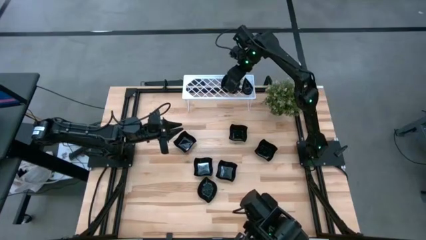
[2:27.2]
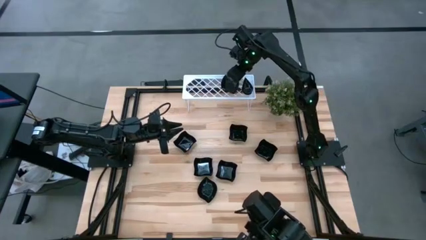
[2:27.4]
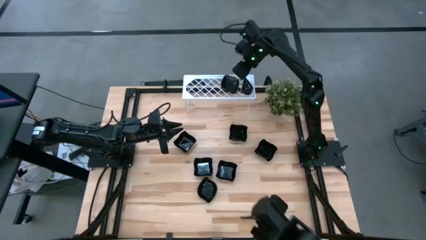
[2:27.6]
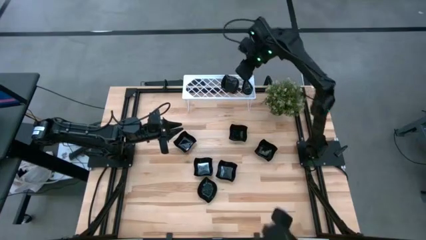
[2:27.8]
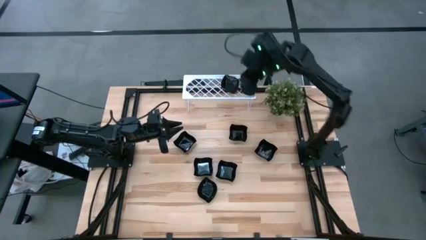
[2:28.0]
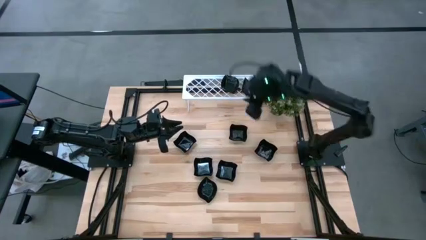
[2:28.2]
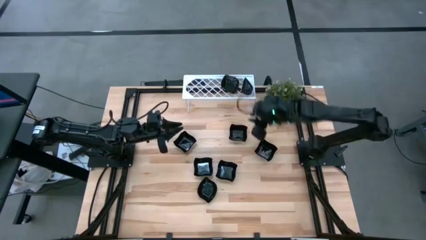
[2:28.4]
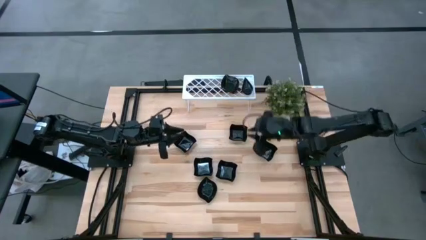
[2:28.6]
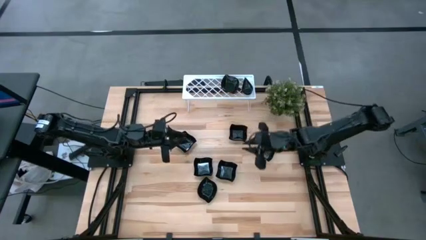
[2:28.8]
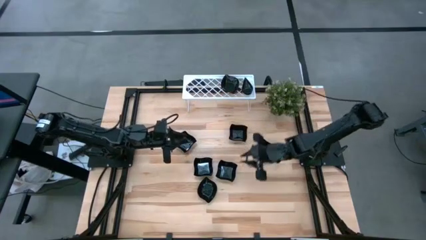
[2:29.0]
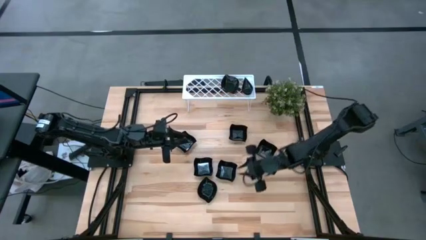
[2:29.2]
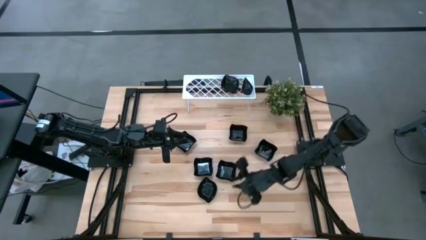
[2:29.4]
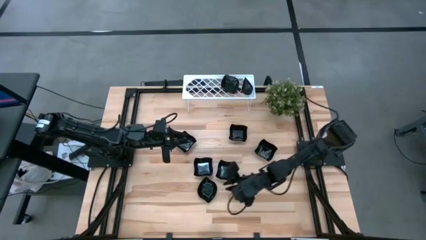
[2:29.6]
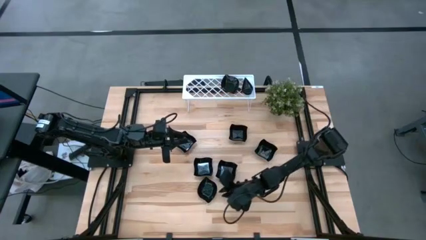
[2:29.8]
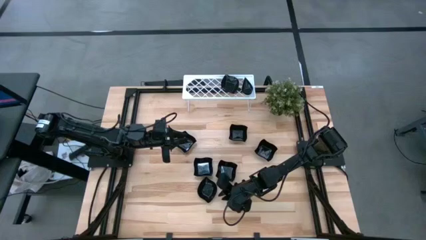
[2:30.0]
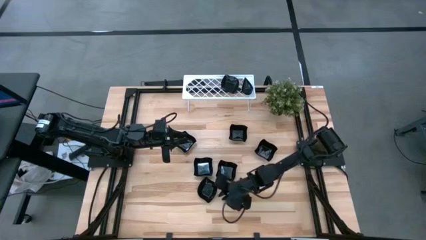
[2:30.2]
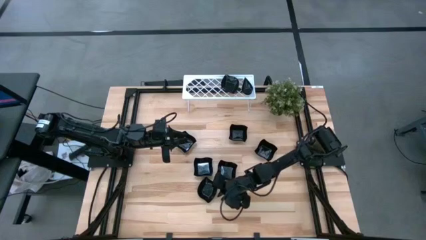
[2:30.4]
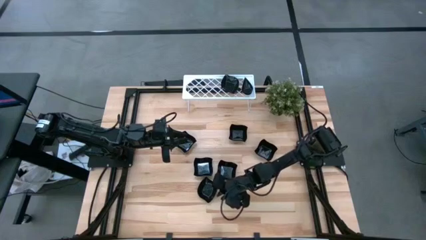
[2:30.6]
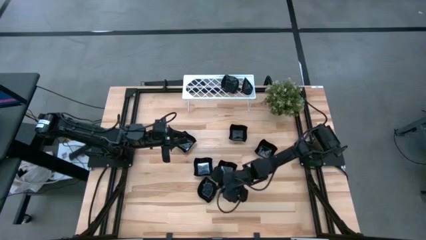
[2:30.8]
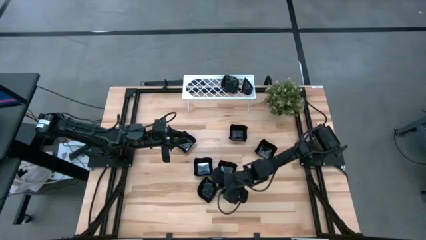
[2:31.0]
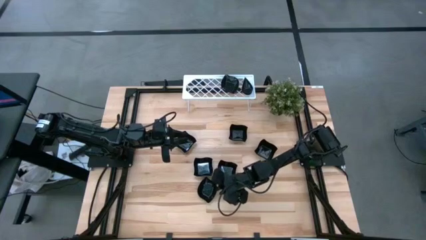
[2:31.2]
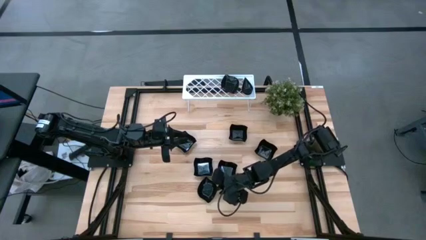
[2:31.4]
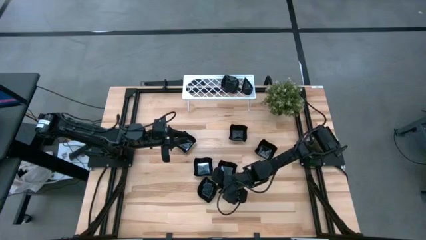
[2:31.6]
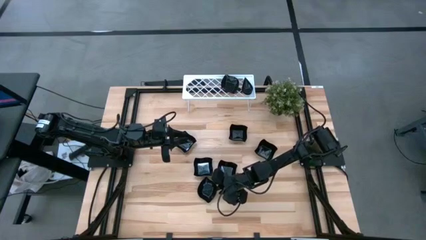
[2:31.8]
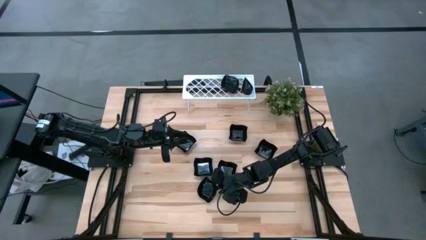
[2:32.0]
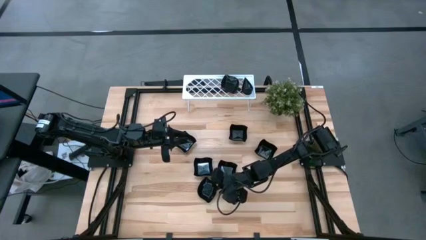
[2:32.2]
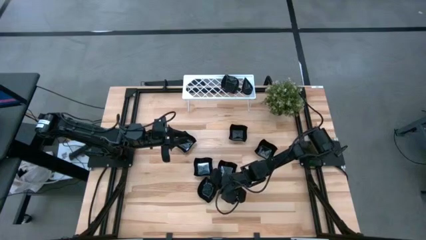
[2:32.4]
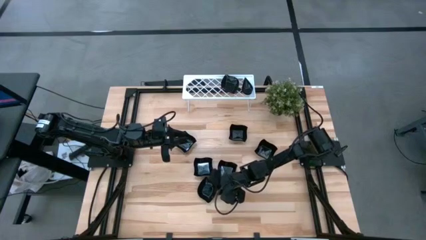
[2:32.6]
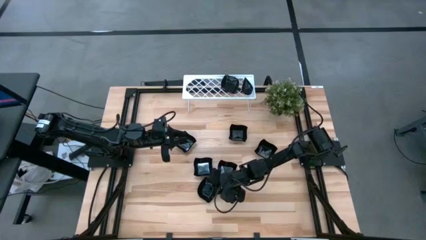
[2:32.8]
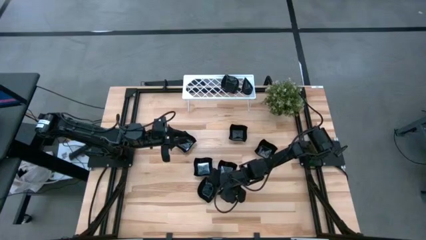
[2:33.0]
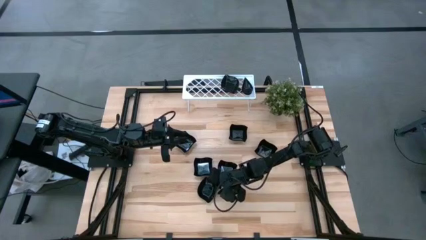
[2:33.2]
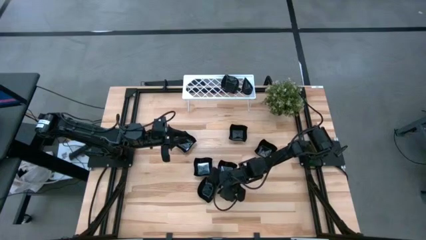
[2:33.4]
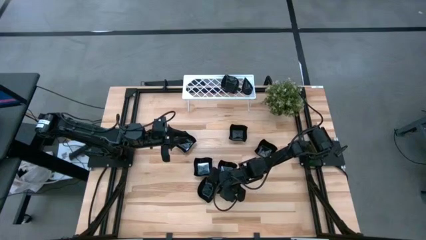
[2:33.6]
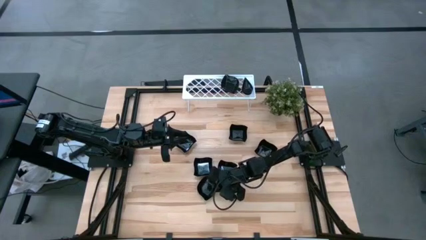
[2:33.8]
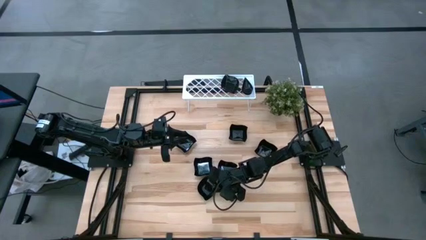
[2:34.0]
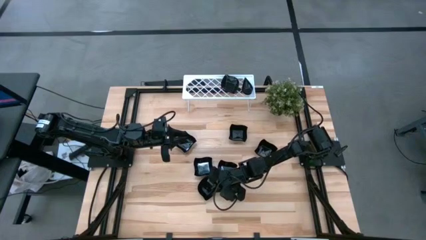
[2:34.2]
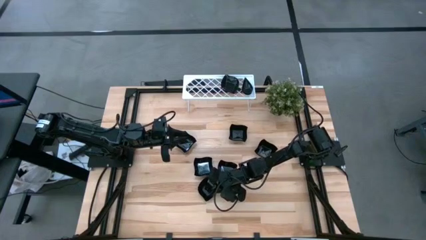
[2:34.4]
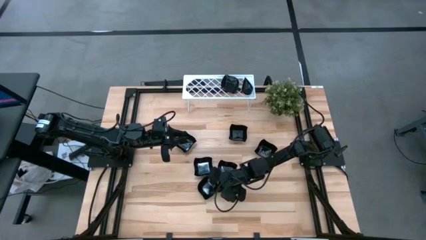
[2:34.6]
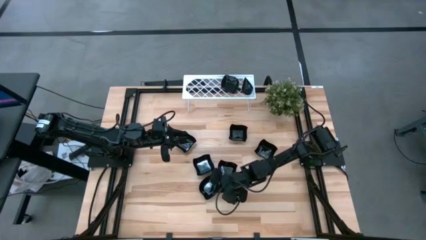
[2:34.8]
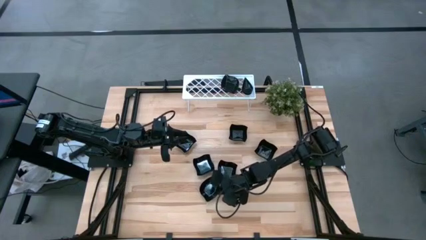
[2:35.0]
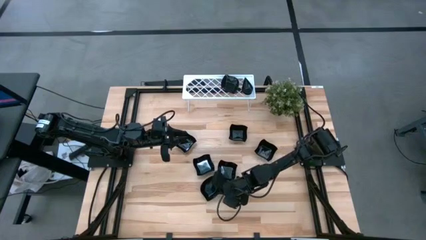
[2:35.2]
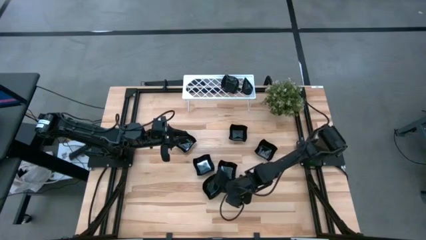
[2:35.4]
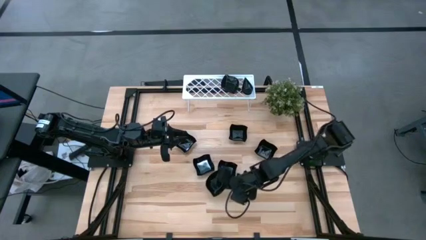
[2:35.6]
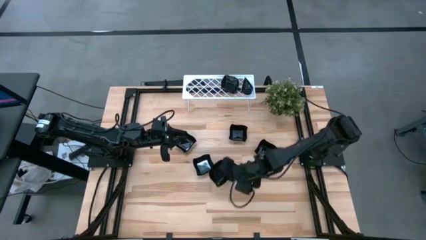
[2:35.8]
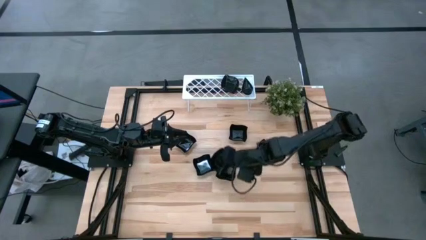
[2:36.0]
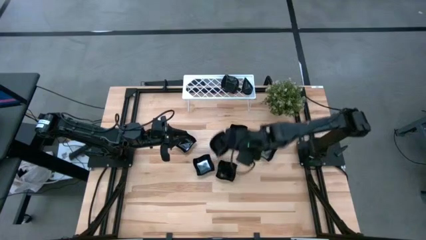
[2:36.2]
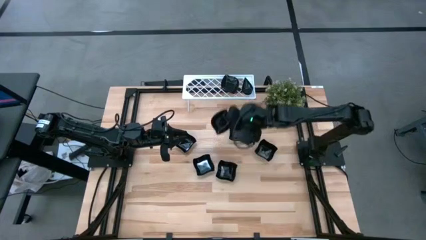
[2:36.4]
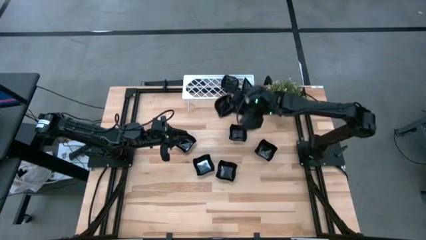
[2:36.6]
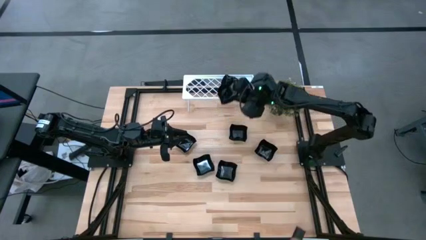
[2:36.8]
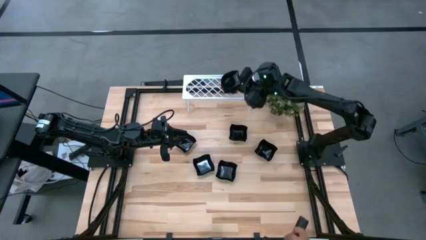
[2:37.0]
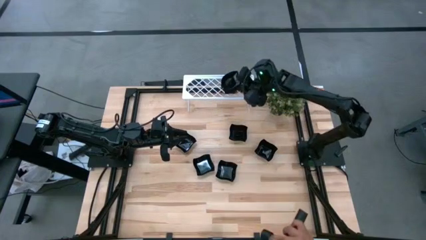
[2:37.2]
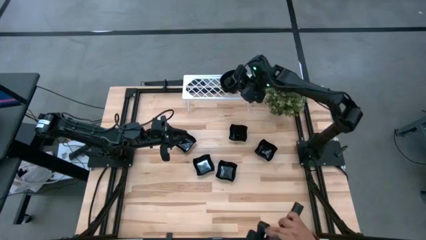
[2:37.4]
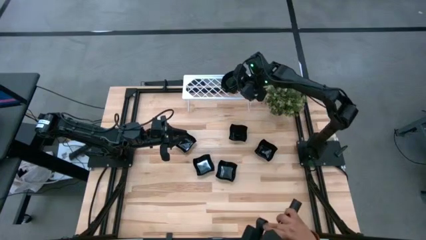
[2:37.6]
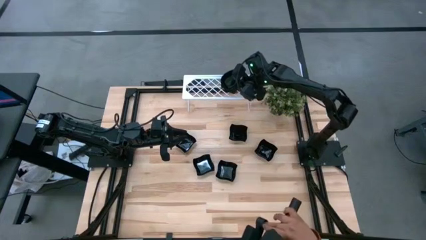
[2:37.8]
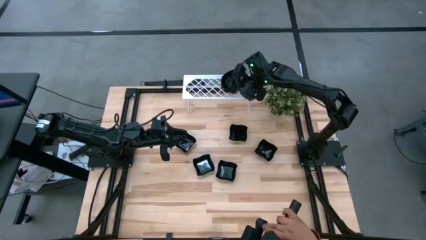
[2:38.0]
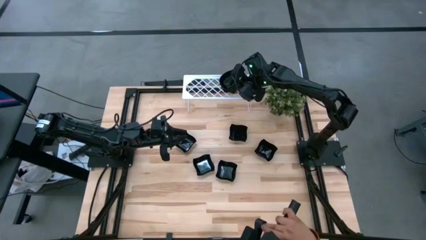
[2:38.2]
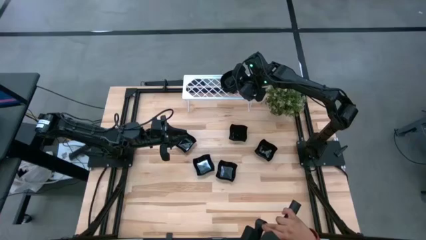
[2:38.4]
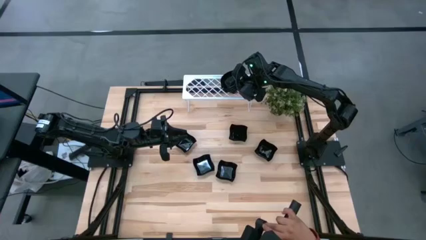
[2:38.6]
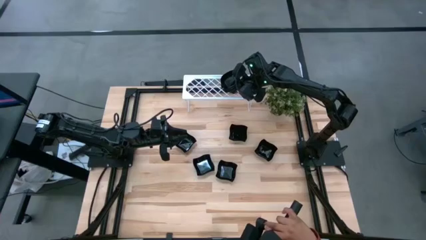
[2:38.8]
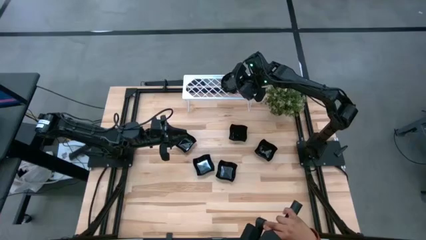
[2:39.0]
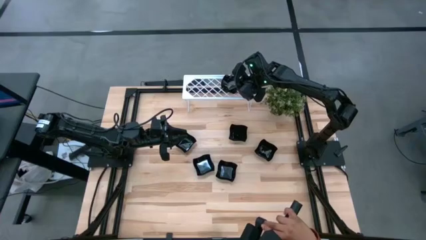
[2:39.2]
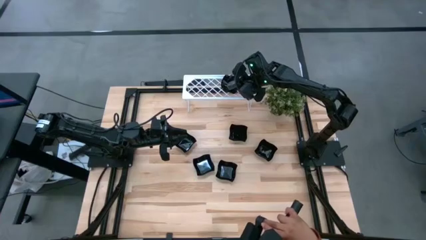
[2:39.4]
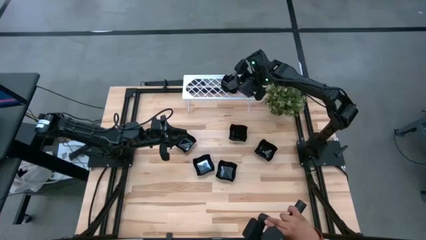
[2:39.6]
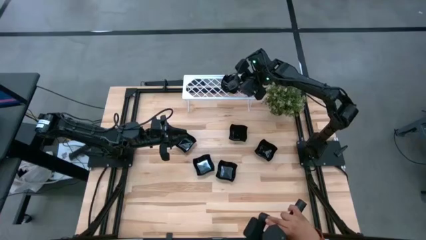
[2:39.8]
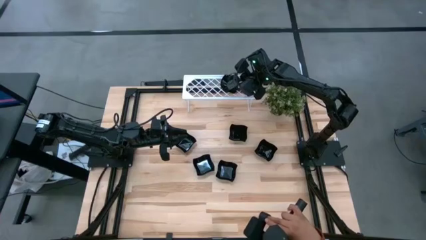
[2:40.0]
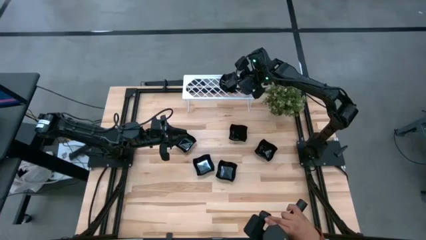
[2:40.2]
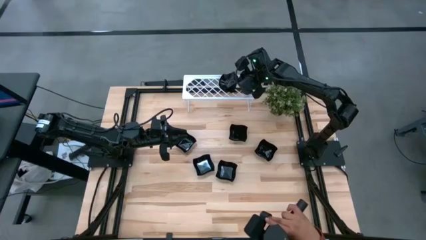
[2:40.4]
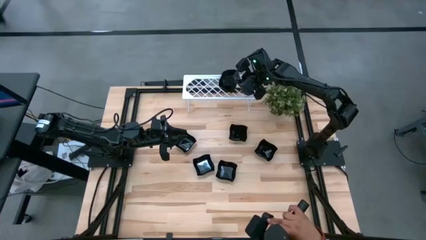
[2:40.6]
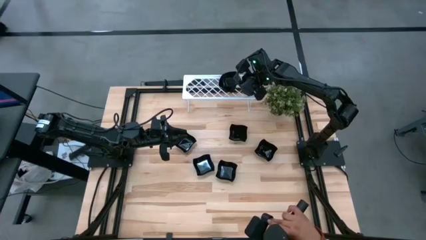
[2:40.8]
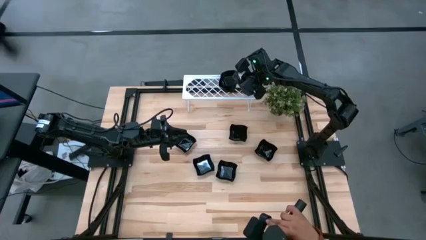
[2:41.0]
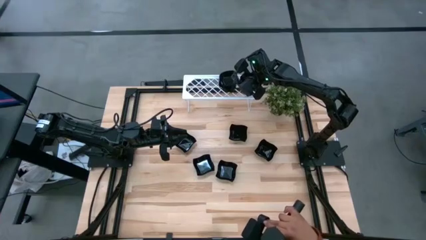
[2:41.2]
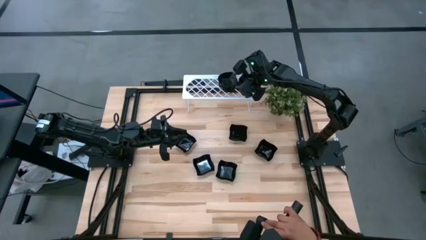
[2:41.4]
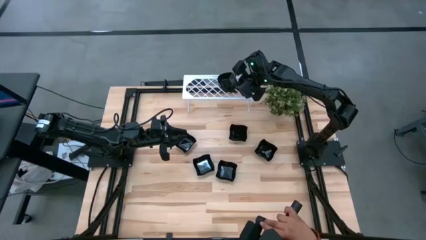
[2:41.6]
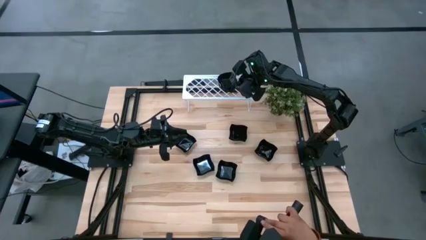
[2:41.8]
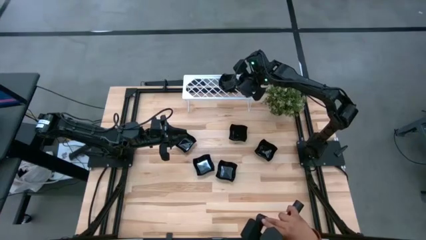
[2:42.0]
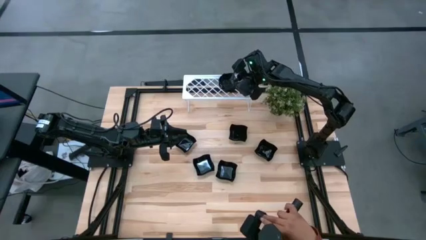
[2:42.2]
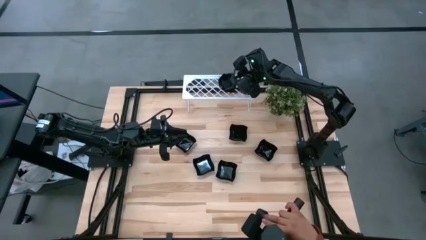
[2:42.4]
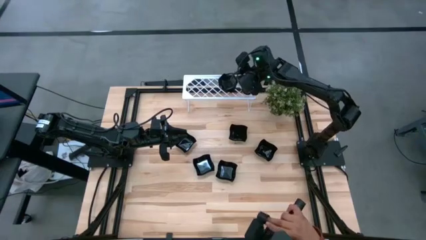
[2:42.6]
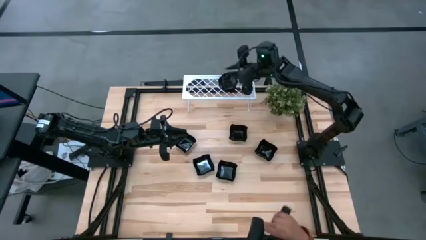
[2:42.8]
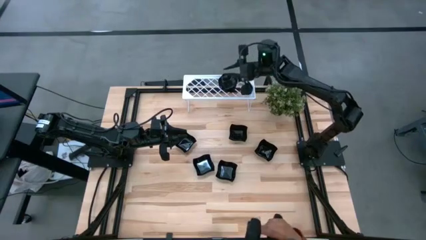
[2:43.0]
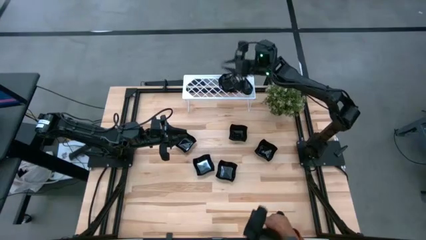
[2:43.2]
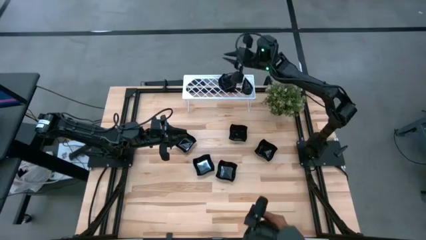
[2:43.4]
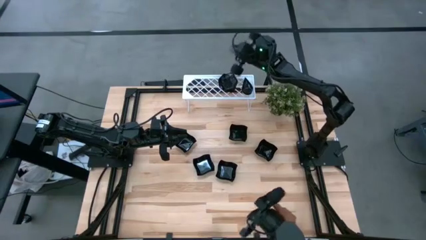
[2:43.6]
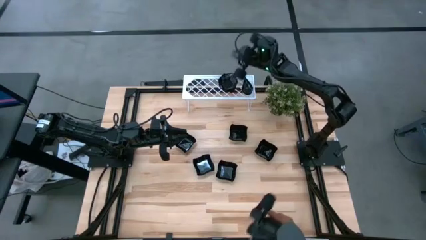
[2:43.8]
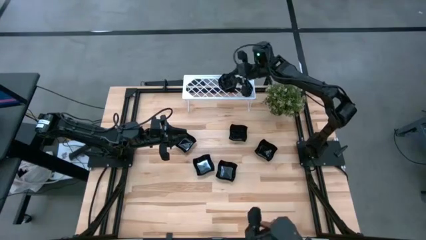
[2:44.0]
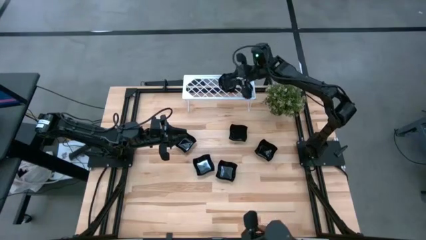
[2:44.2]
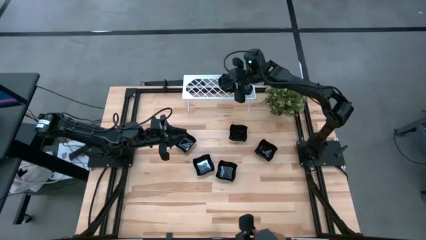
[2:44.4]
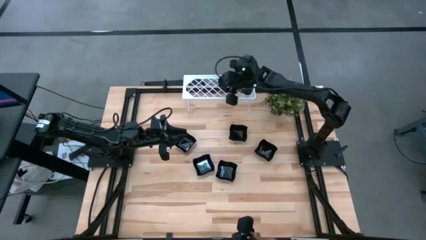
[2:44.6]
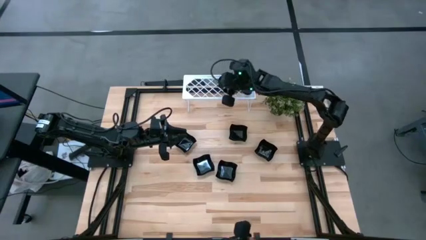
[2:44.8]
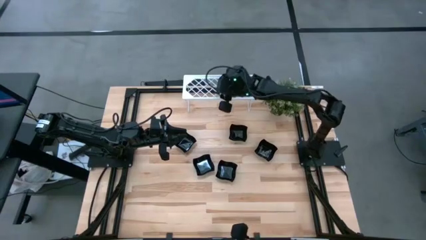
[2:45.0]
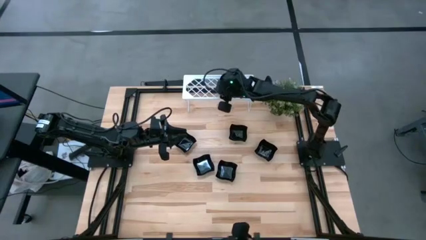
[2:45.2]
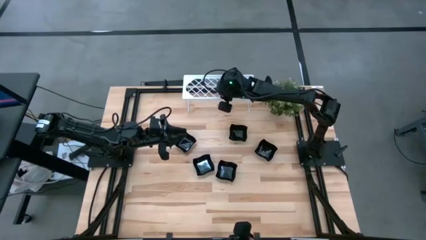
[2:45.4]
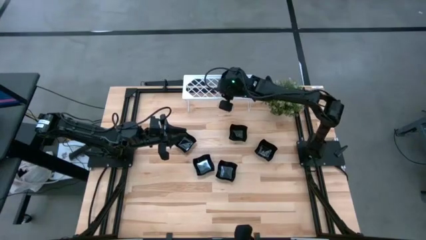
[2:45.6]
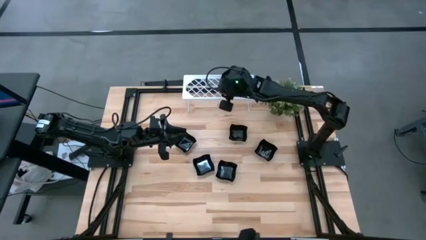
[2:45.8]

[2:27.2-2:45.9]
Task: Pick & Place Mini shaped plates
Stack the leaf shaped plate on top of the leaf shaped plate on the shelf
